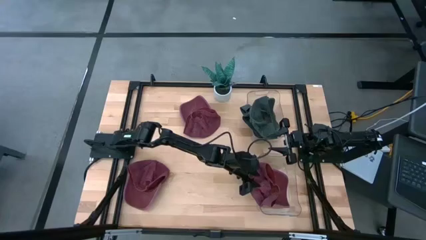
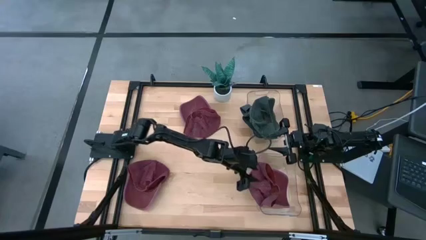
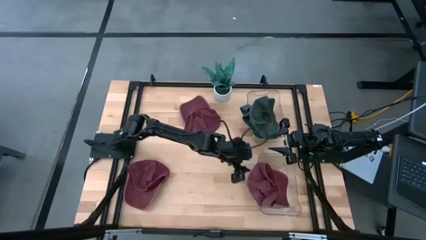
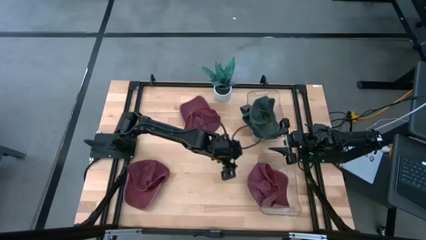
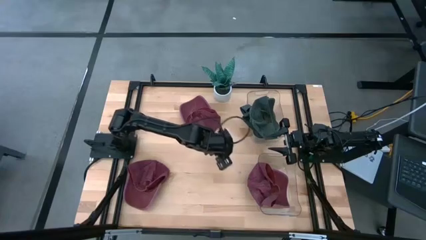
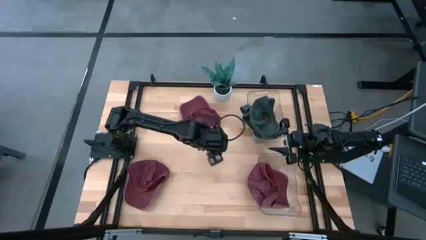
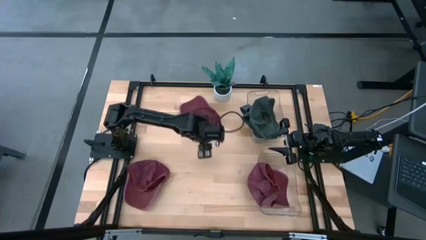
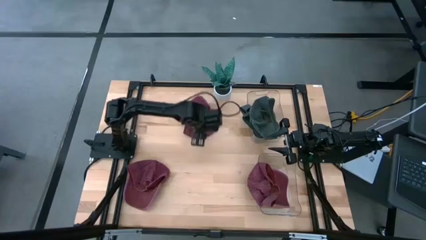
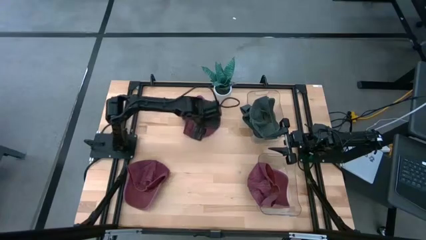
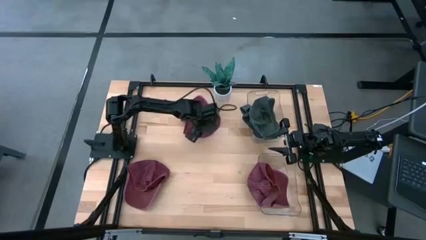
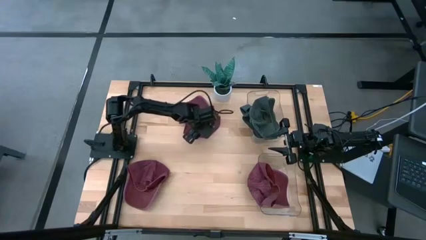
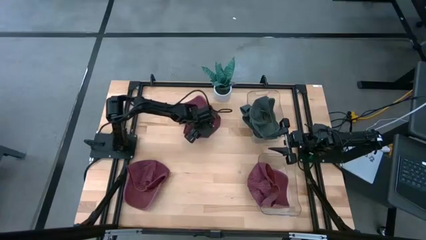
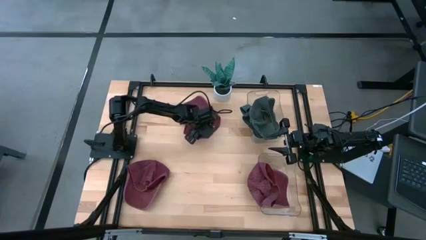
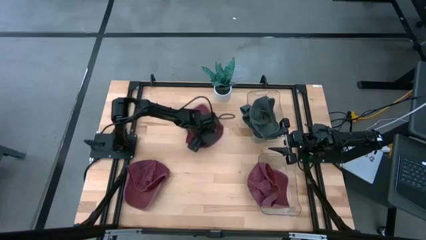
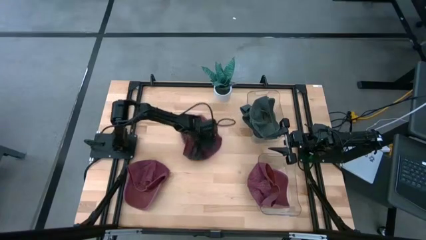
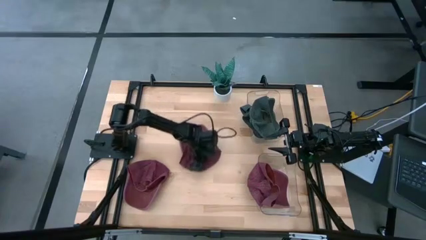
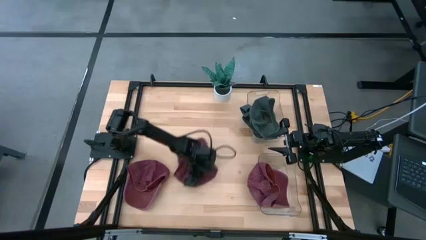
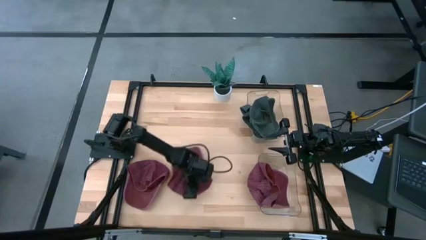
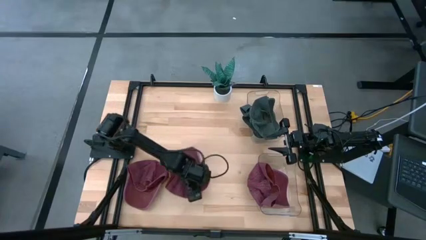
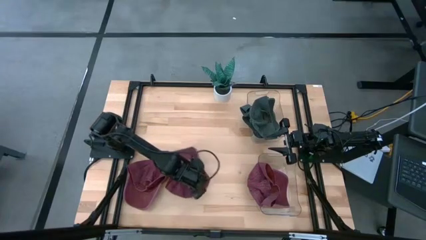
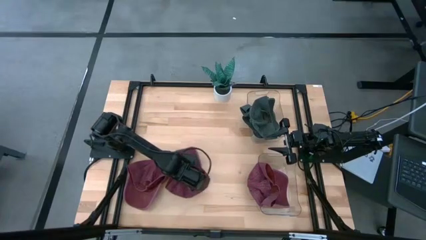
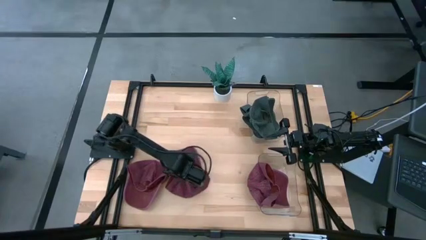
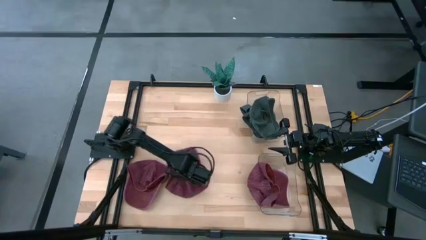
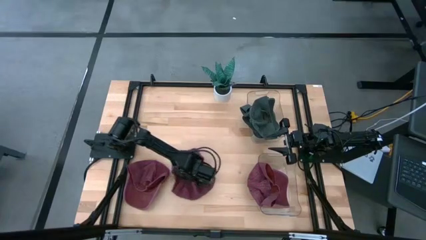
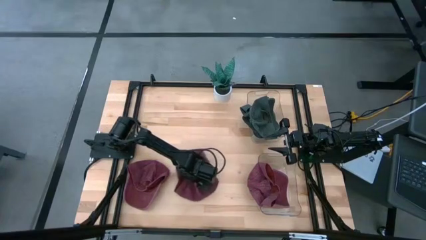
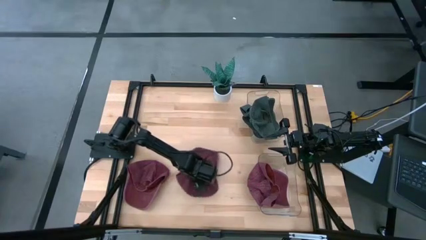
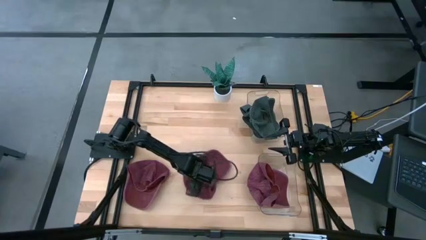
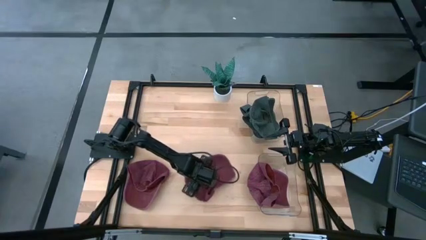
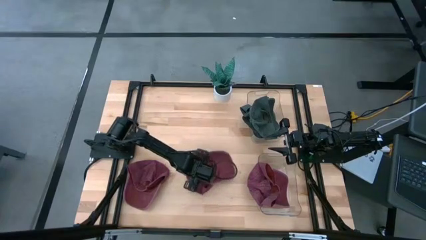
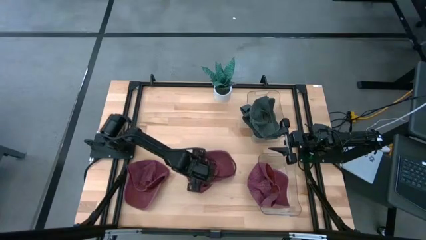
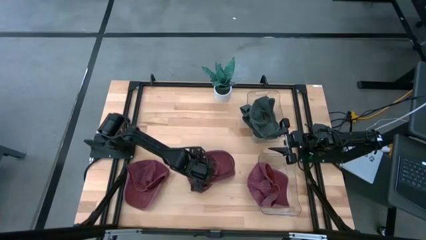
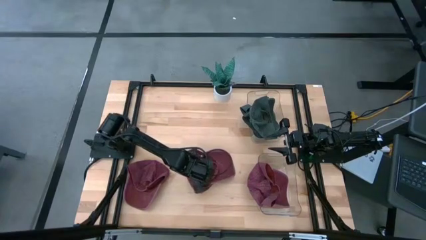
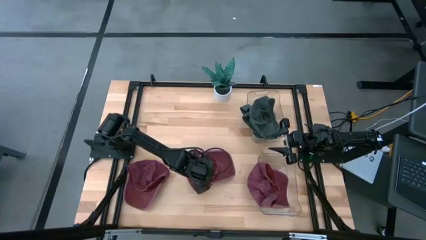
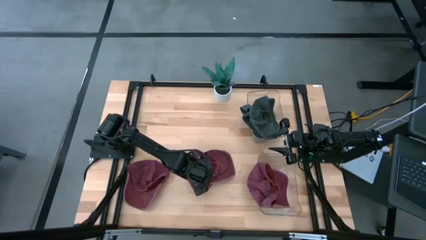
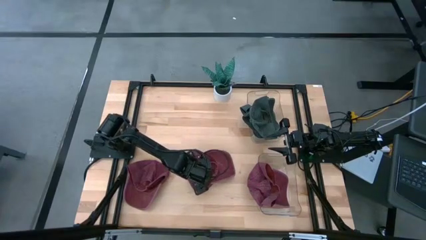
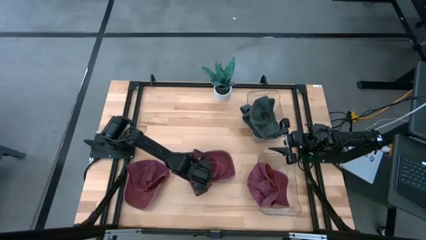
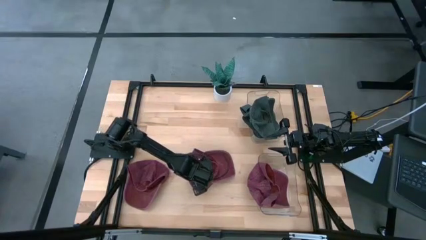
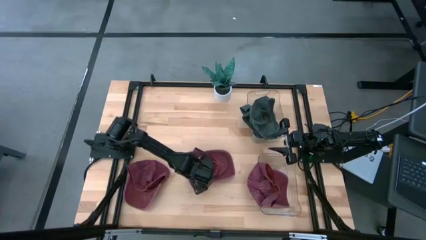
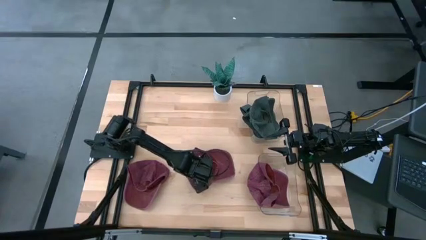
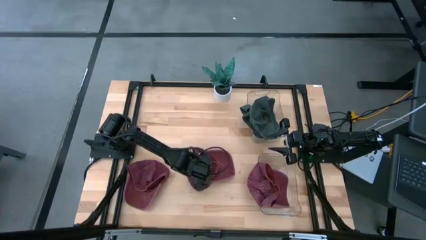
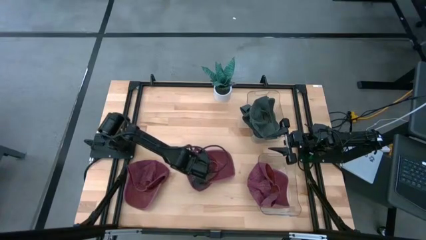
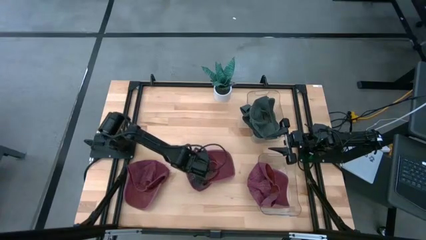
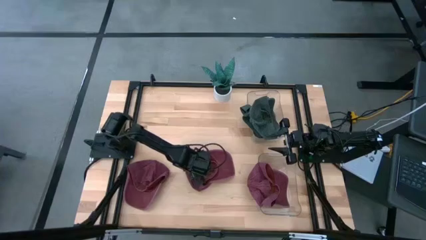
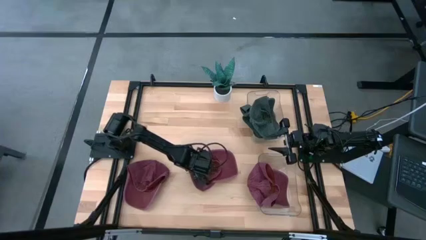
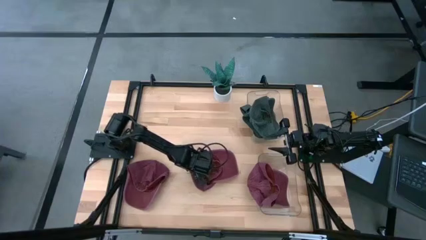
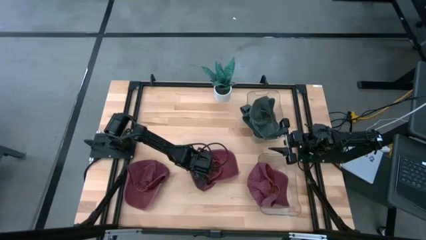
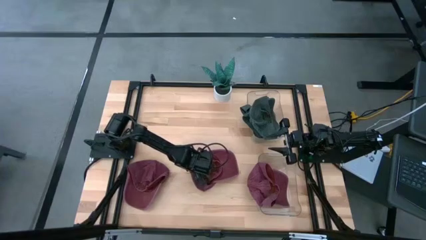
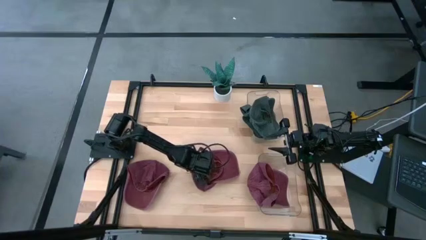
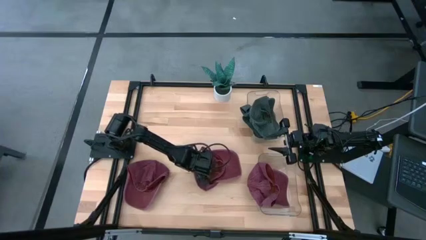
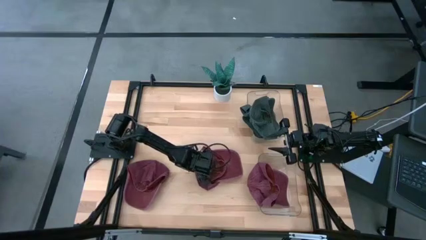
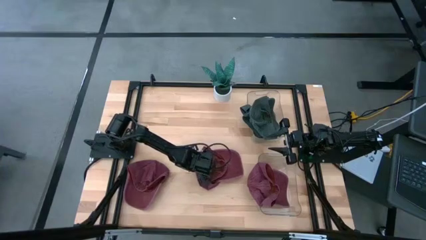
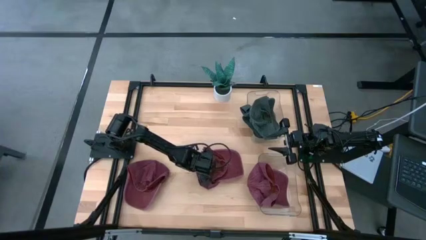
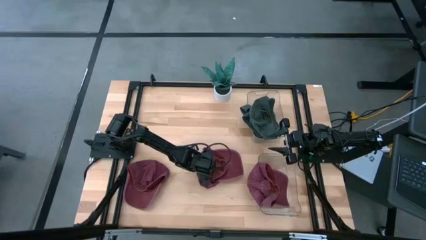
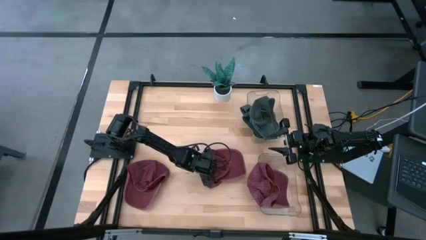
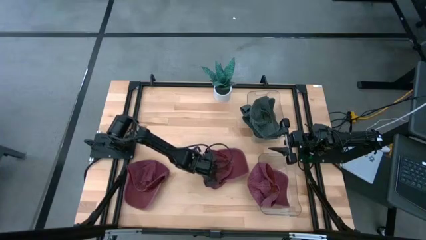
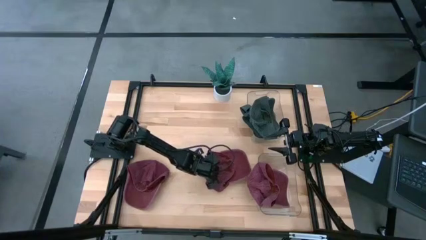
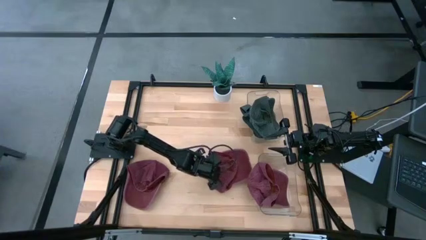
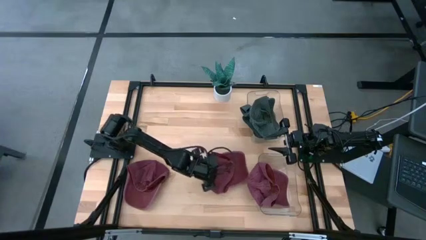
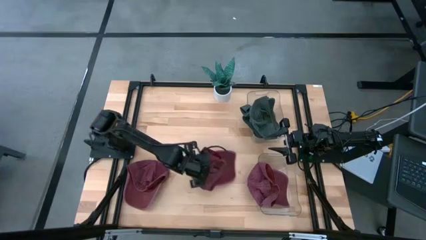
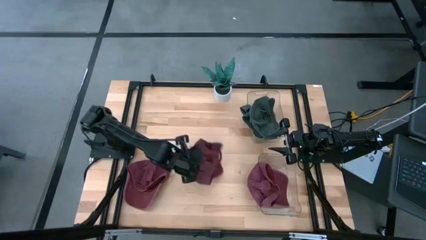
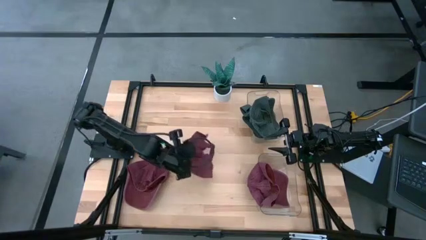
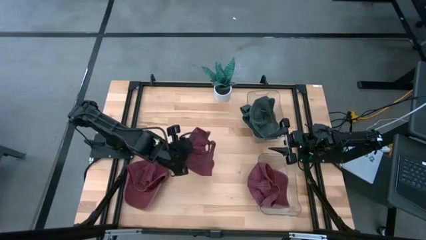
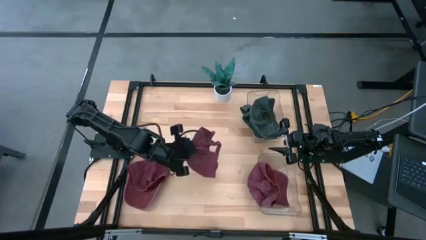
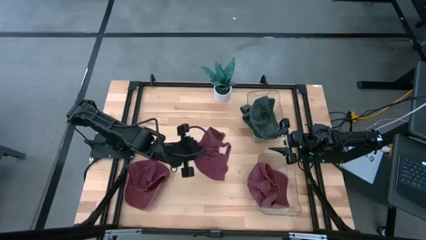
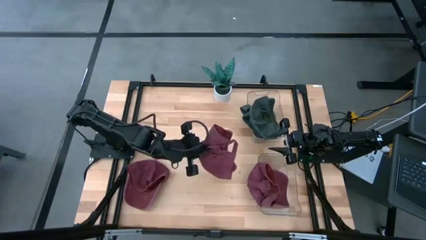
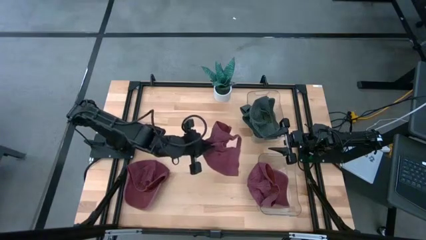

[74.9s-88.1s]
Task: Pick & Place hat
Put the top red cap into the bottom transparent bin
